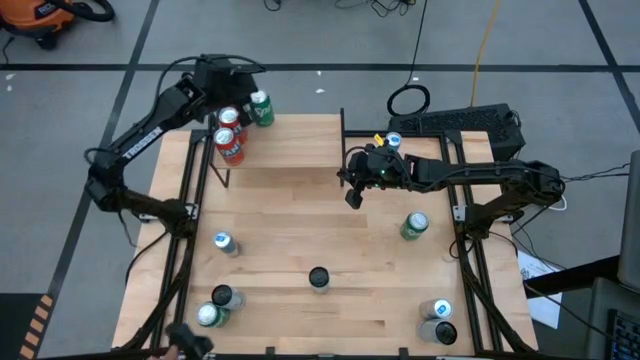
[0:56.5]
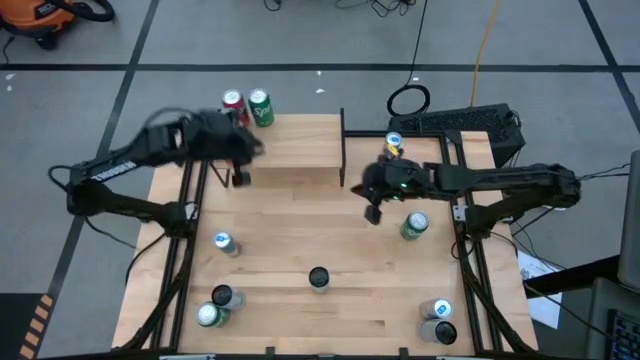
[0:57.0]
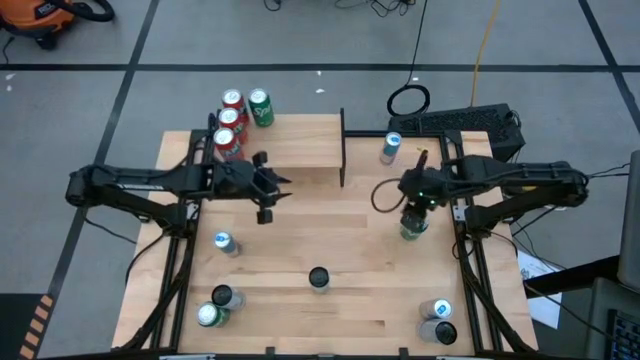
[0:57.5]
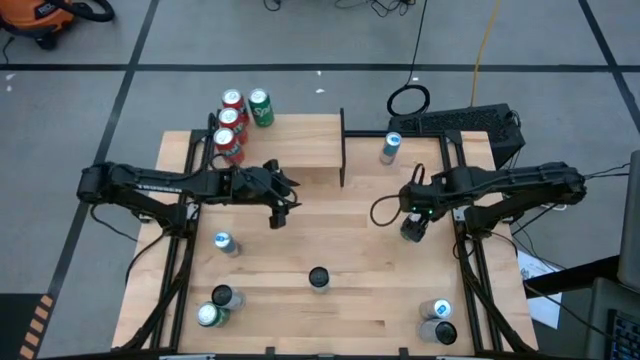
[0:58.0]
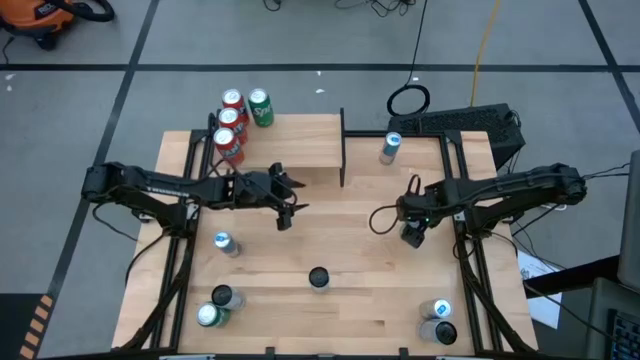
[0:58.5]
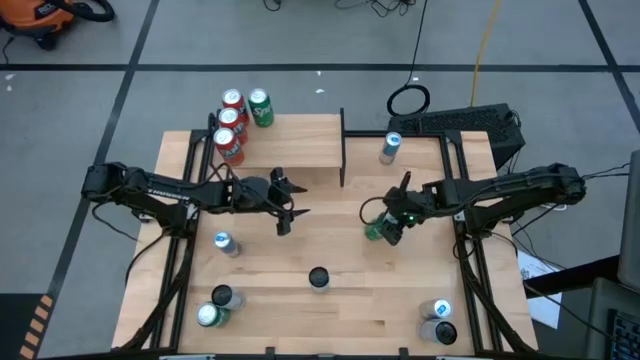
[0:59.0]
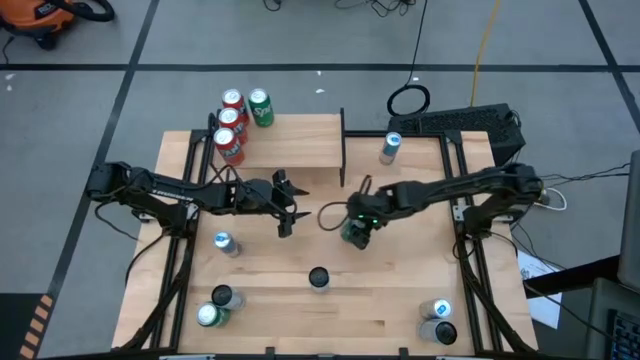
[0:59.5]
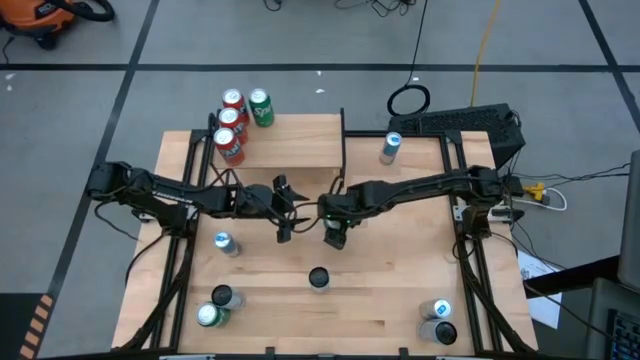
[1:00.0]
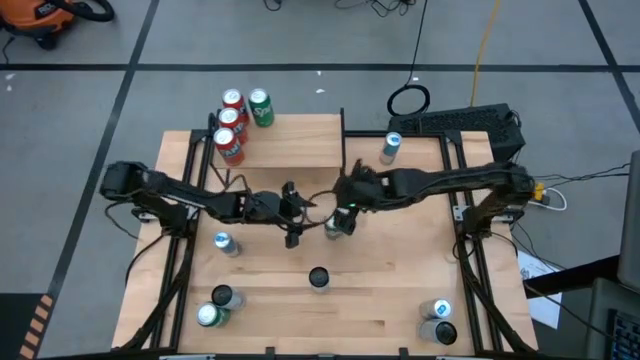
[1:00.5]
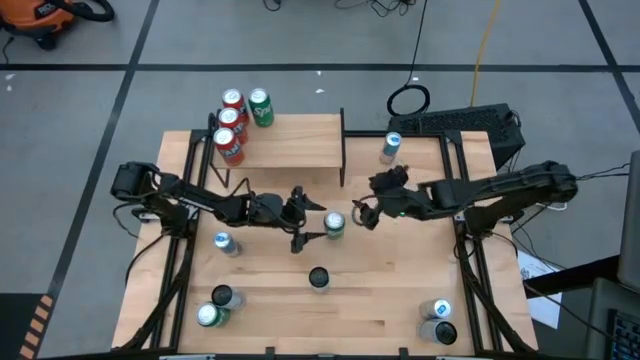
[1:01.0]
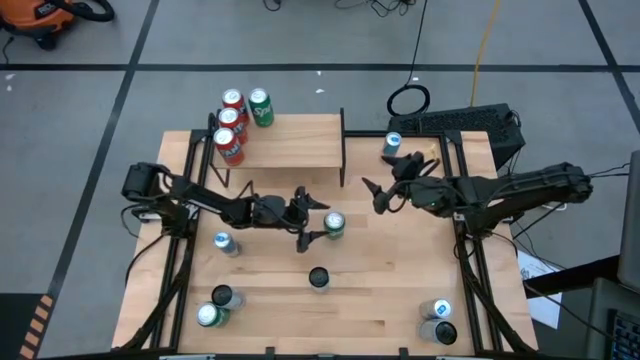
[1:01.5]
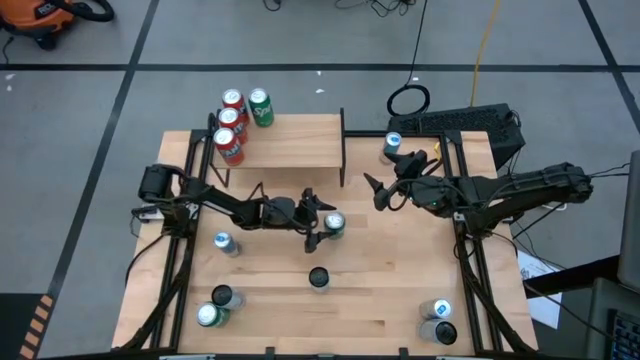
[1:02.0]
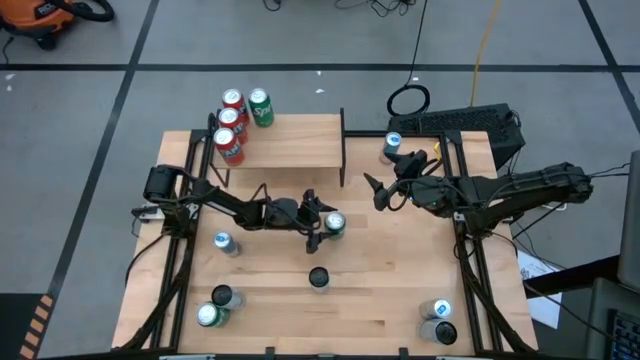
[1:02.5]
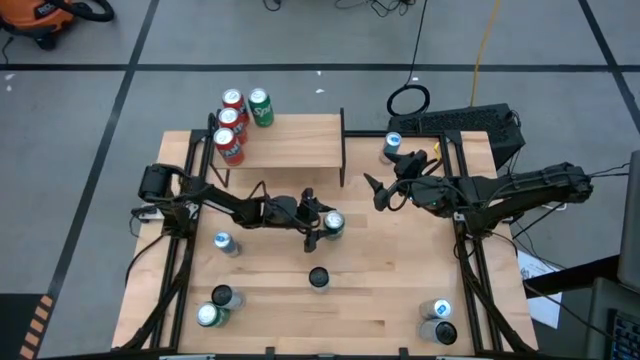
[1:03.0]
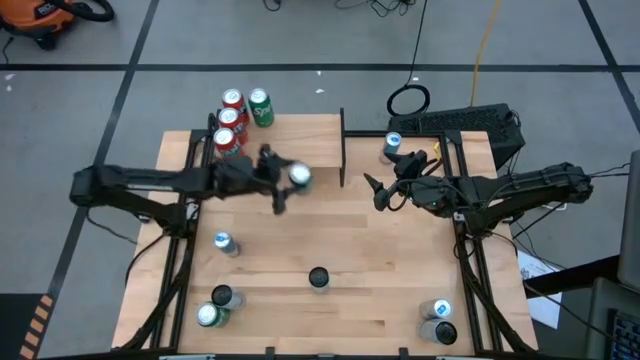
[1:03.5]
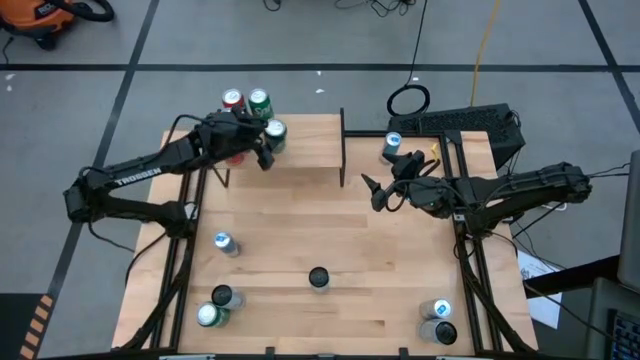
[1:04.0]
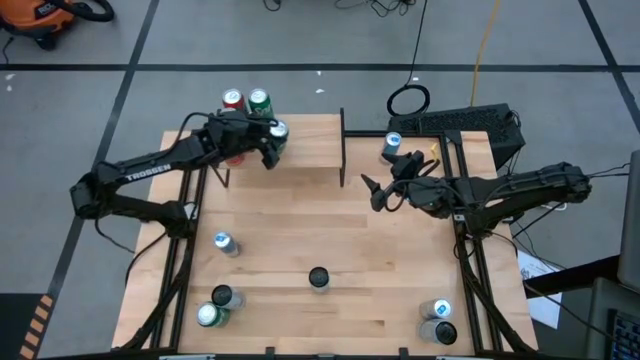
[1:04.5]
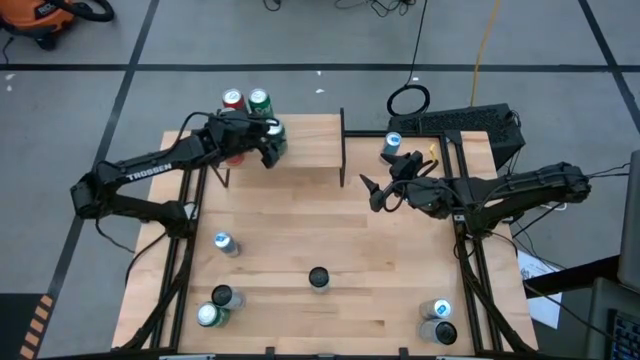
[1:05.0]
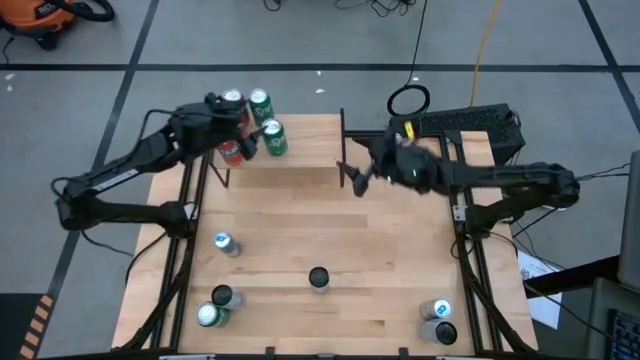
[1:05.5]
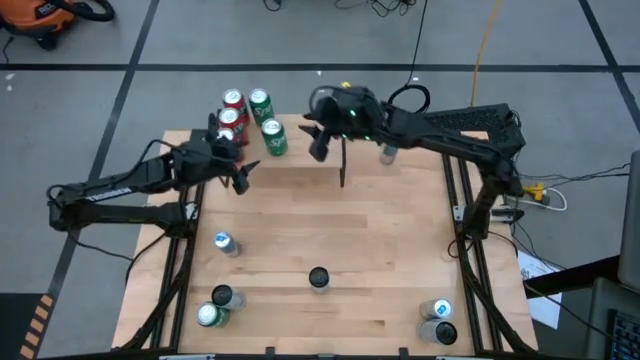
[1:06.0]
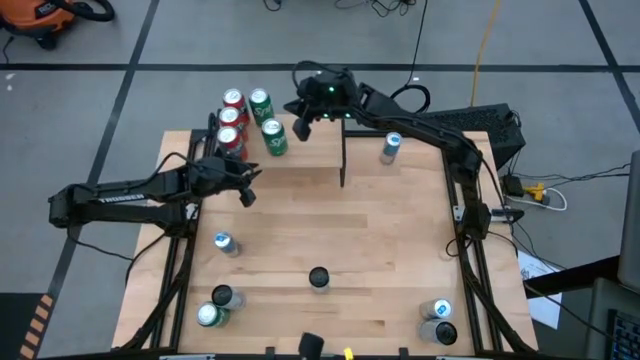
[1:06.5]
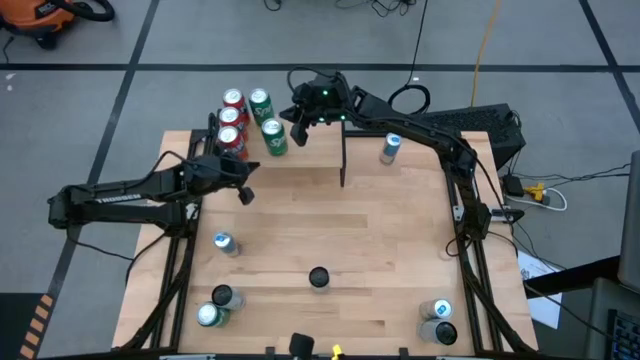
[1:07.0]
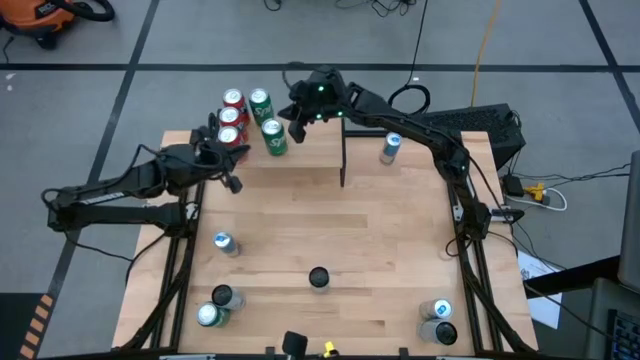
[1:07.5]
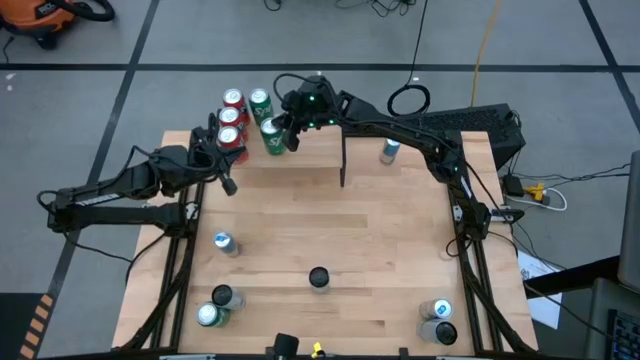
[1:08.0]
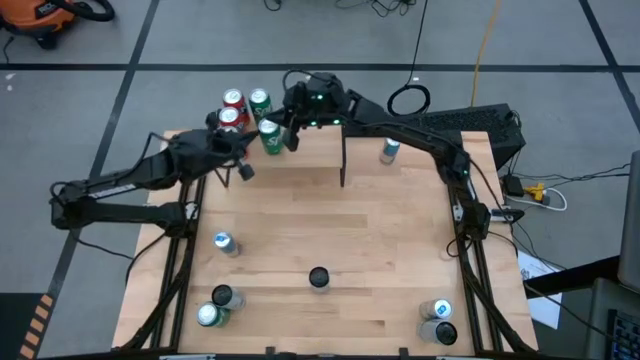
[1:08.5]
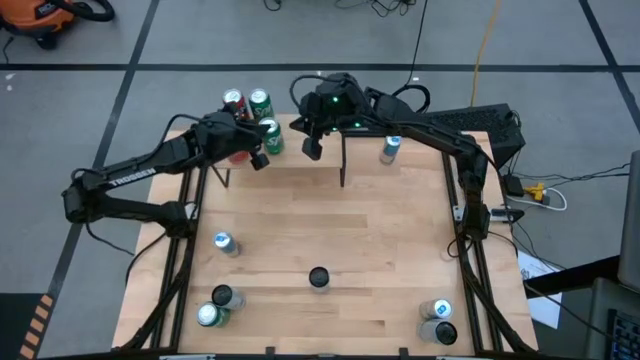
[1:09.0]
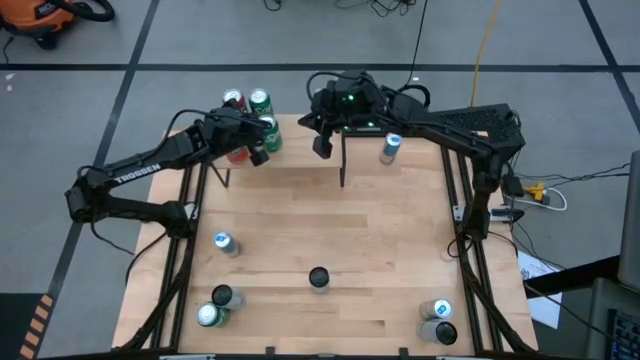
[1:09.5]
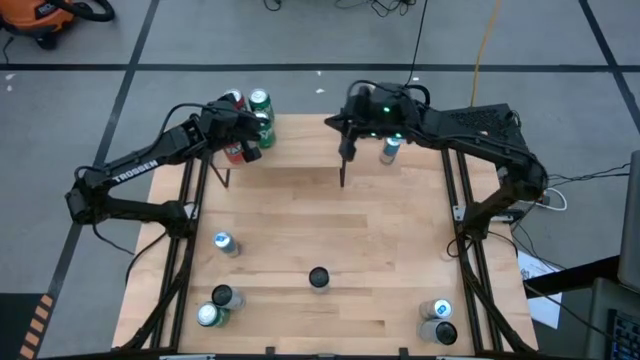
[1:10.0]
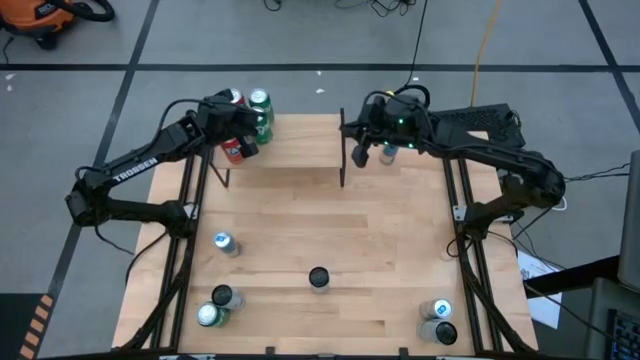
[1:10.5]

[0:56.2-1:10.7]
Task: Place canned beverage on shelf
Put the middle right green soda can on the shelf

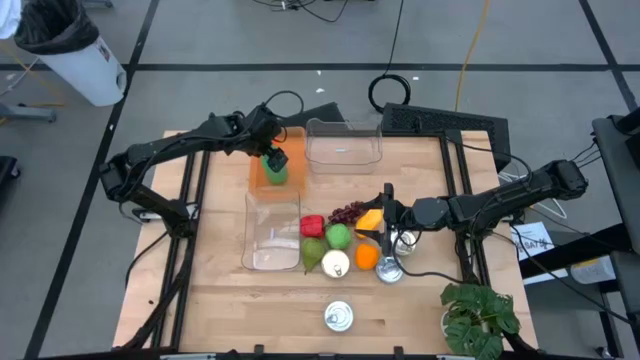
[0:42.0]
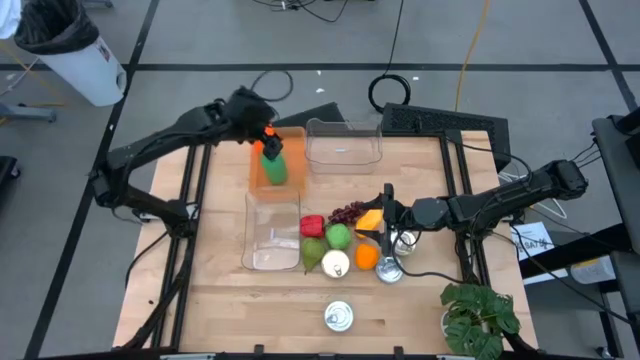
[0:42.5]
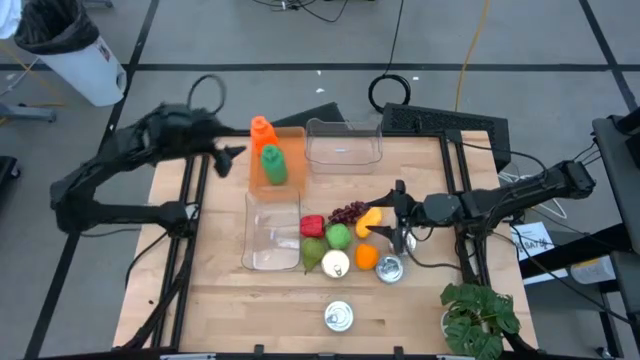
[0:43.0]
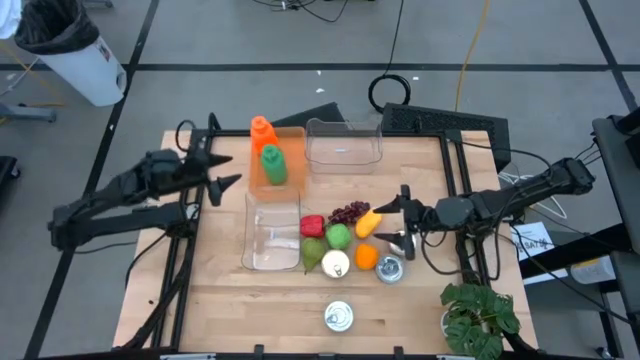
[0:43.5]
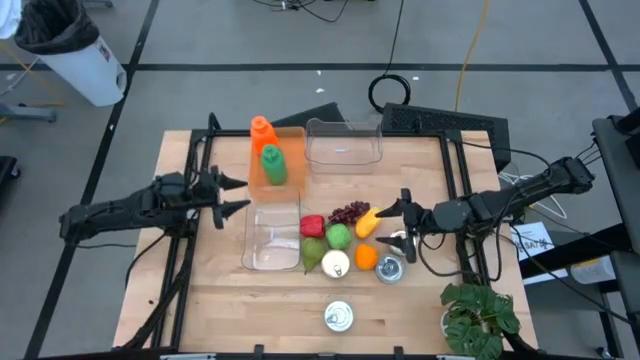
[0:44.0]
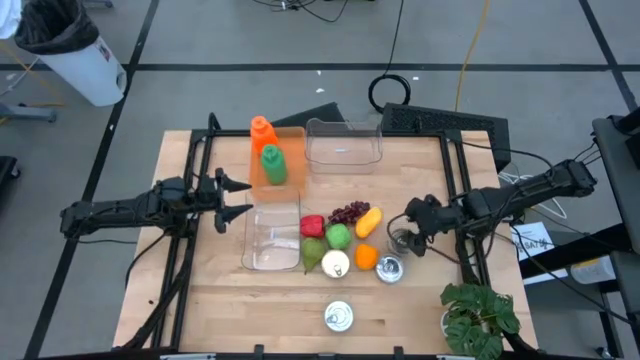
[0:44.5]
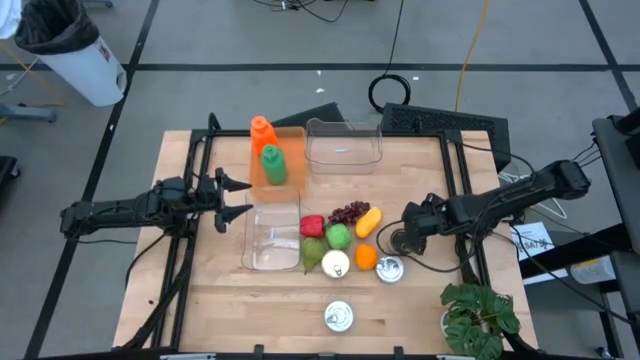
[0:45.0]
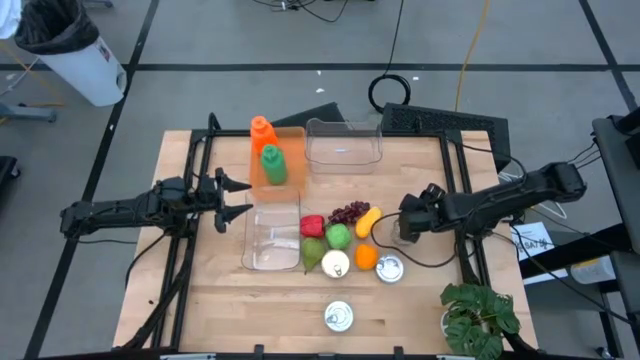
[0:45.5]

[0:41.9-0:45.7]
Task: Pick & Place Food Item
Put the blue and pink tuna can into the bottom transparent bin
